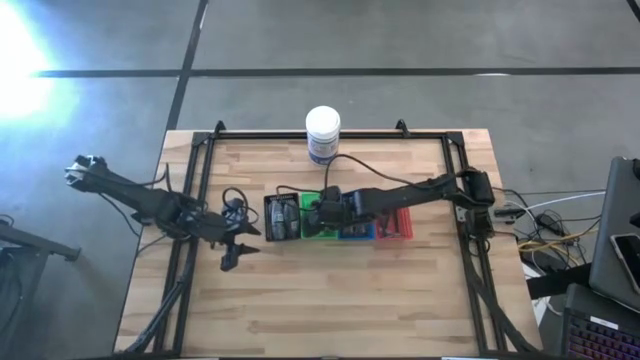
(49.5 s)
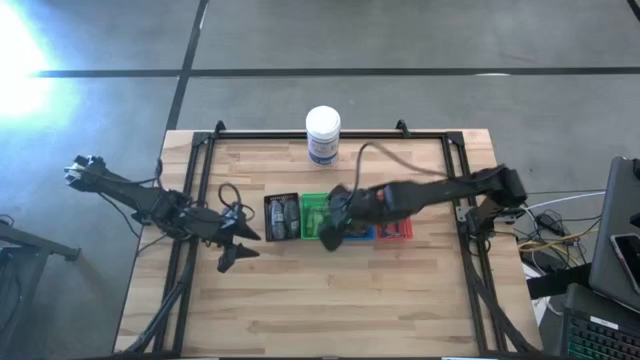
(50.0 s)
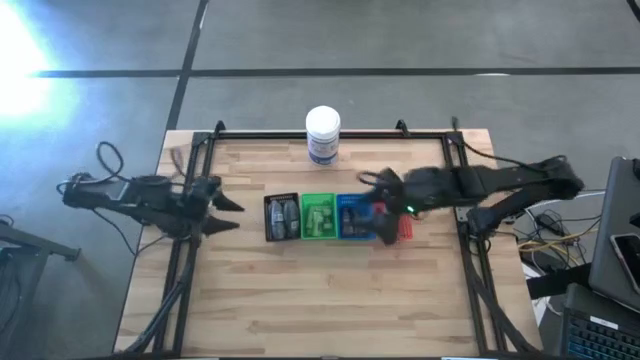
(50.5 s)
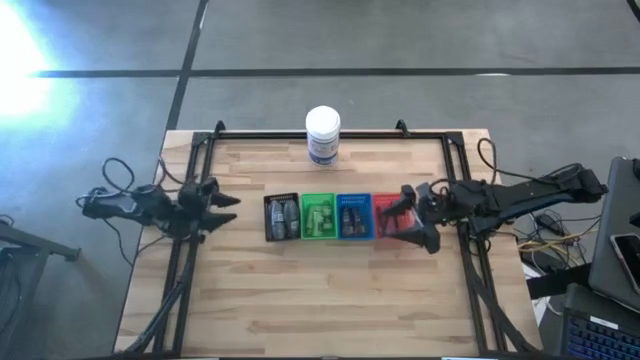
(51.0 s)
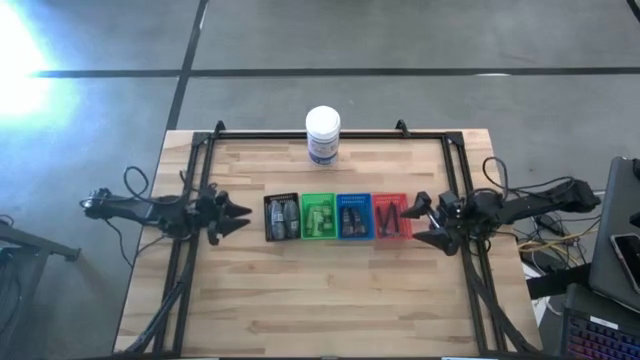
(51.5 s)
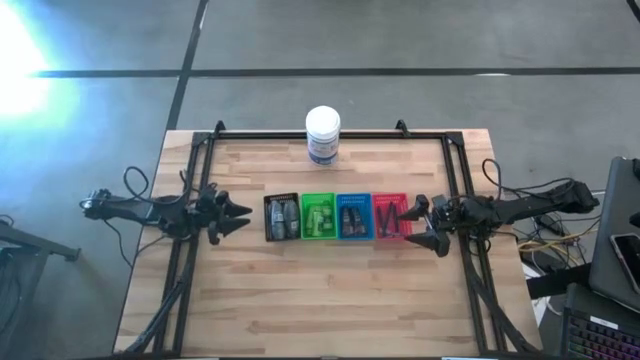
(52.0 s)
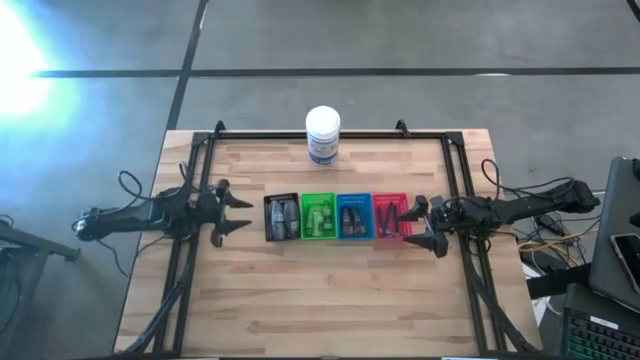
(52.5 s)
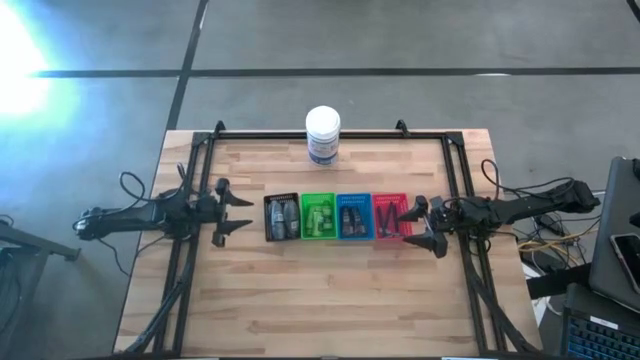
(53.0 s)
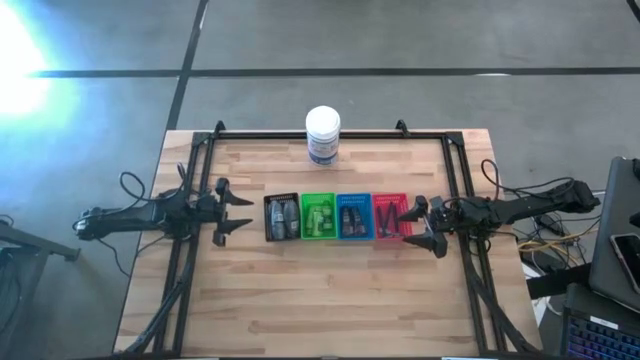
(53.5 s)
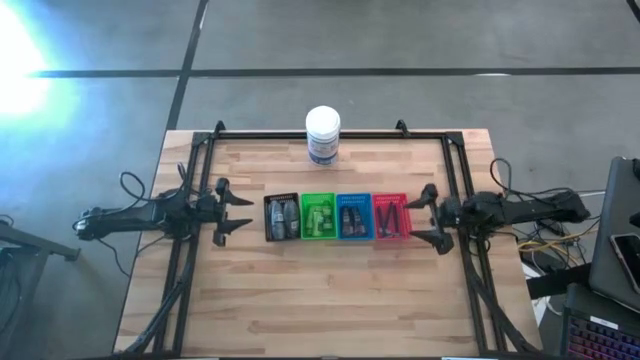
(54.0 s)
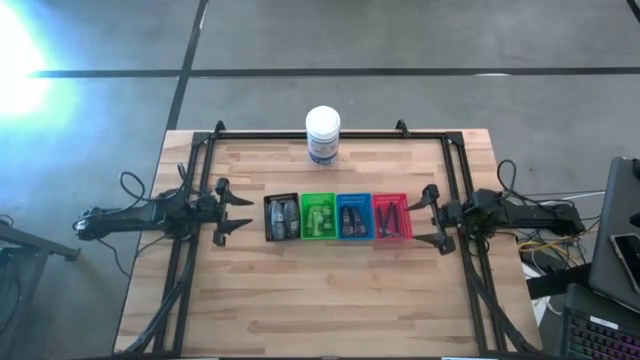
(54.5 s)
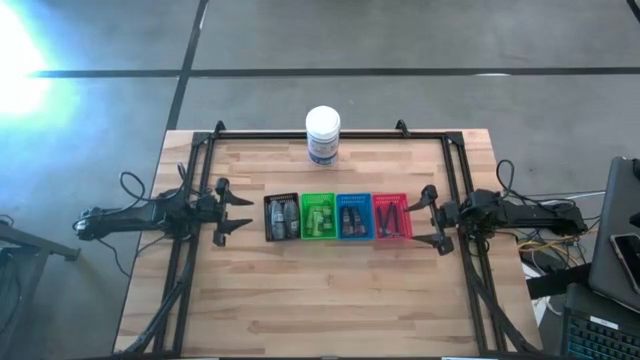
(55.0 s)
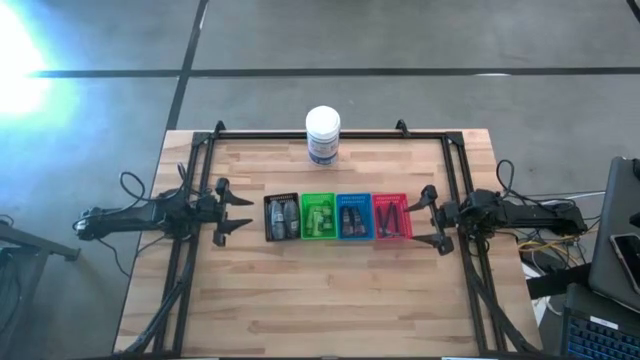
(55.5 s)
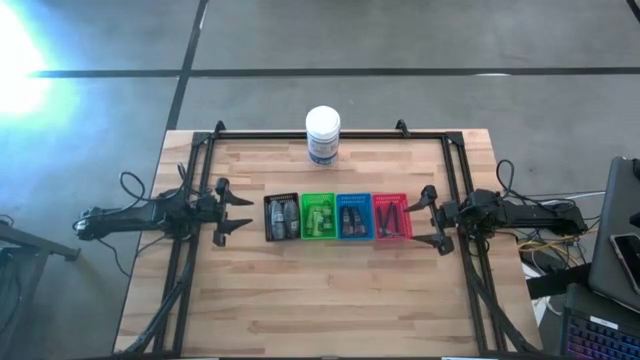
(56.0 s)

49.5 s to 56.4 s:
Task: Pick & Place Travel size toiletries
Return to Home Position

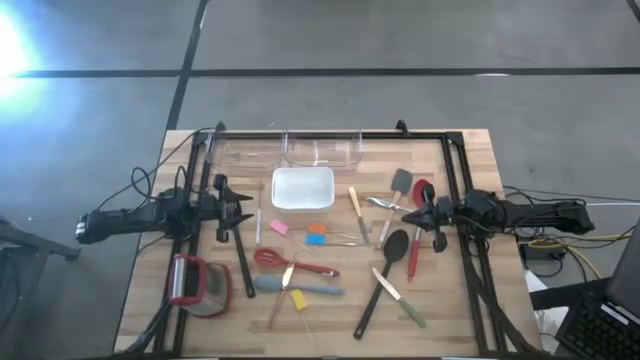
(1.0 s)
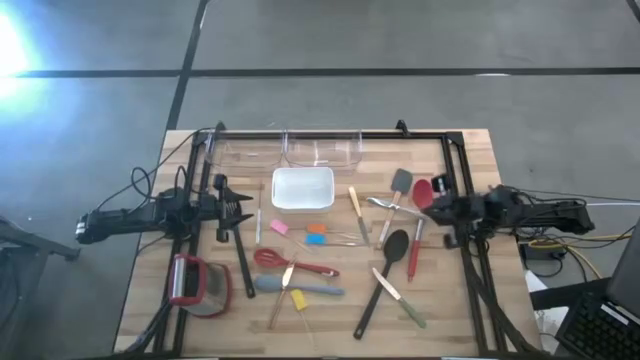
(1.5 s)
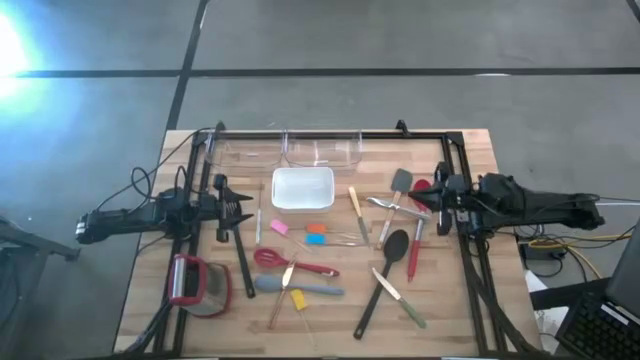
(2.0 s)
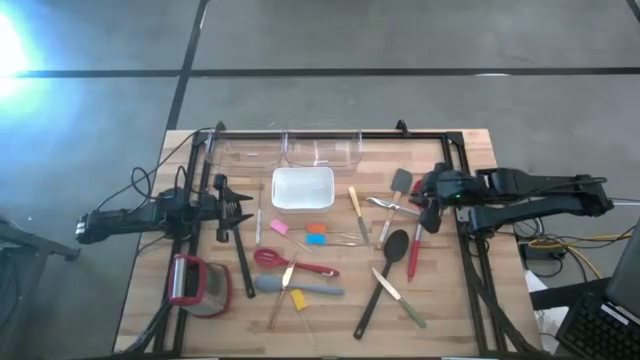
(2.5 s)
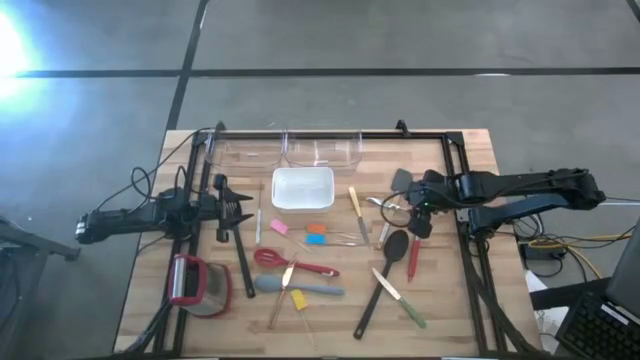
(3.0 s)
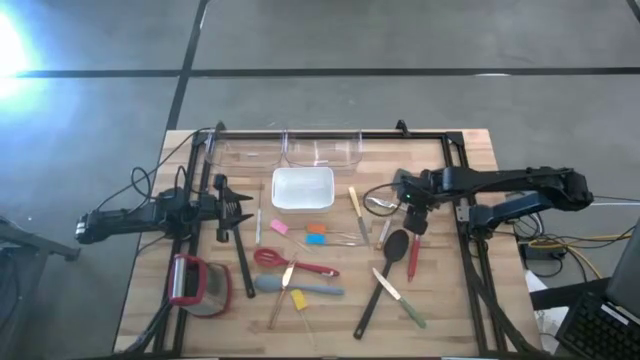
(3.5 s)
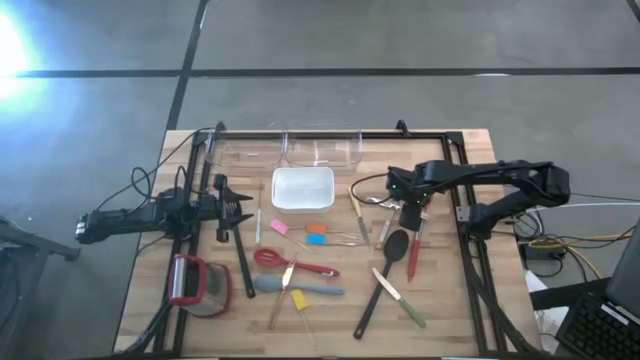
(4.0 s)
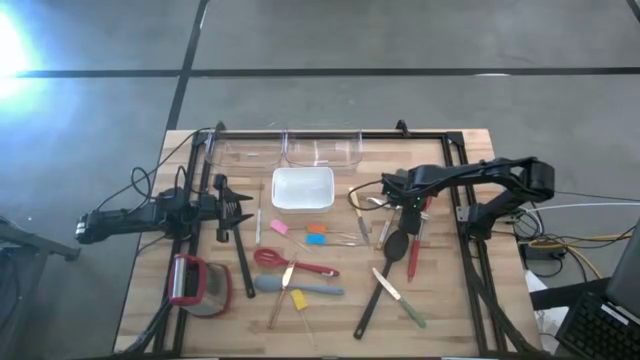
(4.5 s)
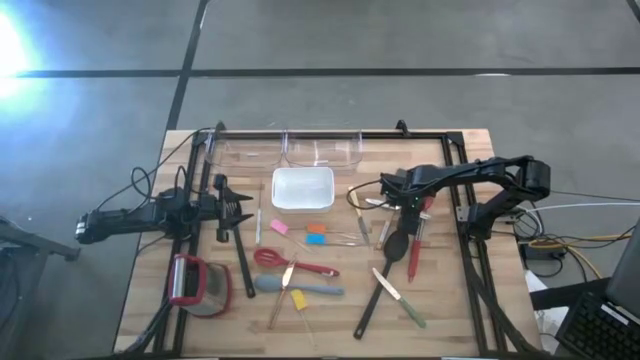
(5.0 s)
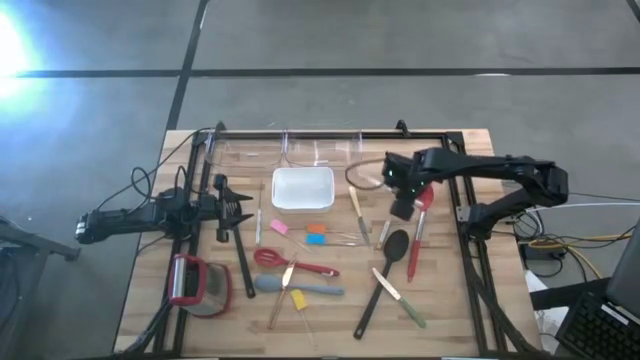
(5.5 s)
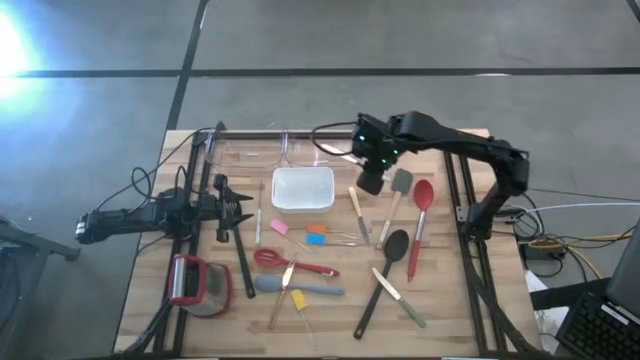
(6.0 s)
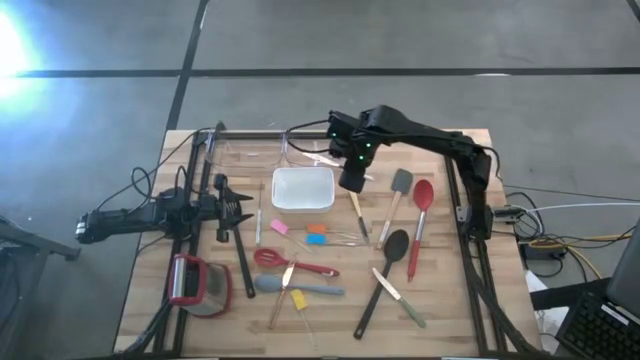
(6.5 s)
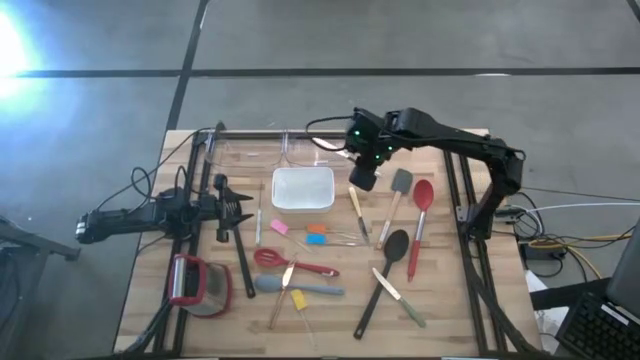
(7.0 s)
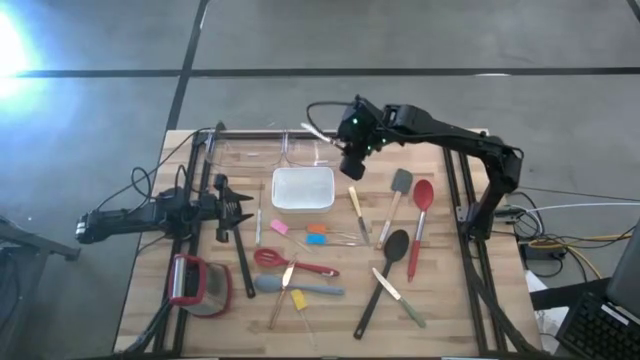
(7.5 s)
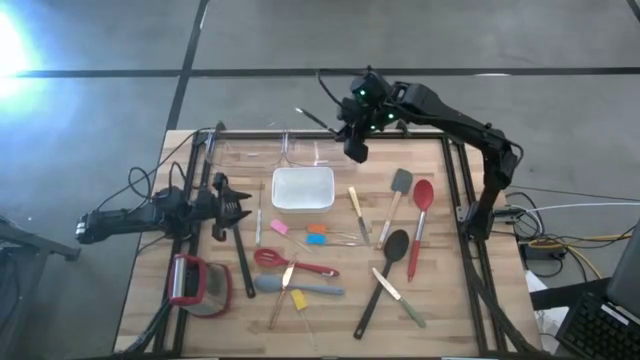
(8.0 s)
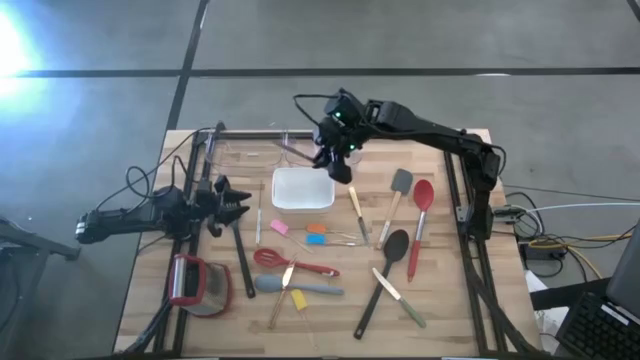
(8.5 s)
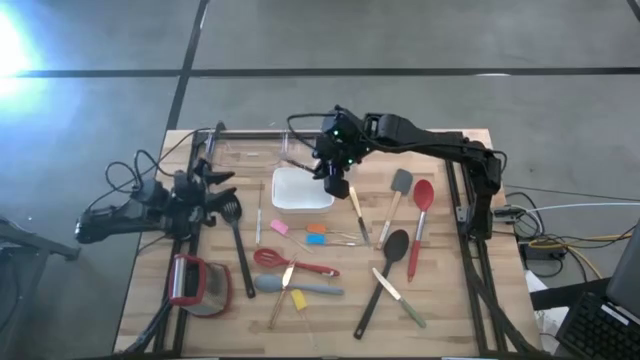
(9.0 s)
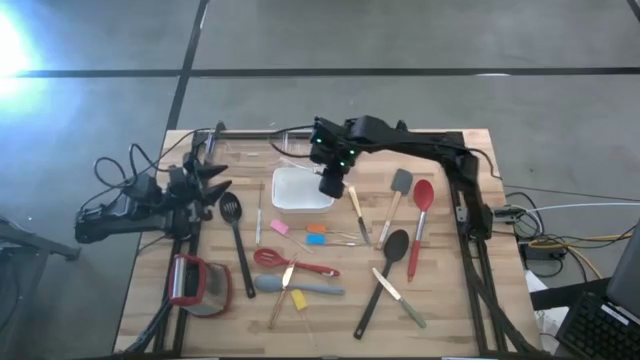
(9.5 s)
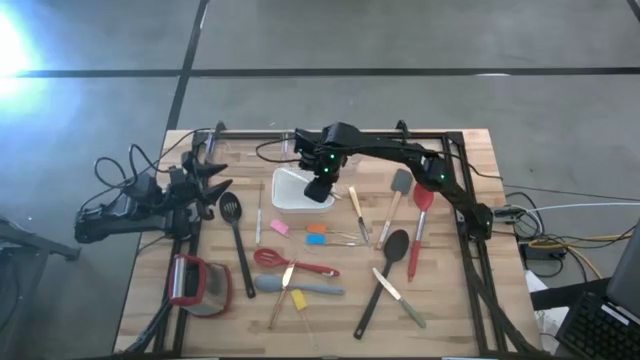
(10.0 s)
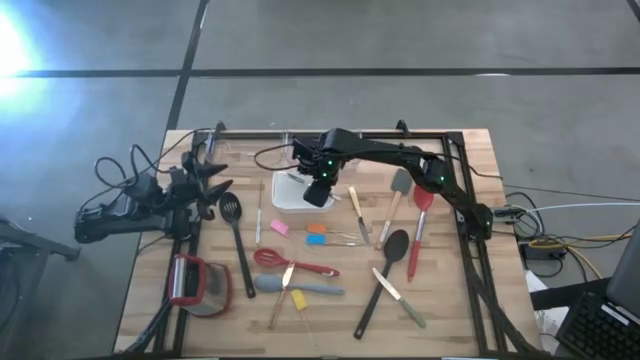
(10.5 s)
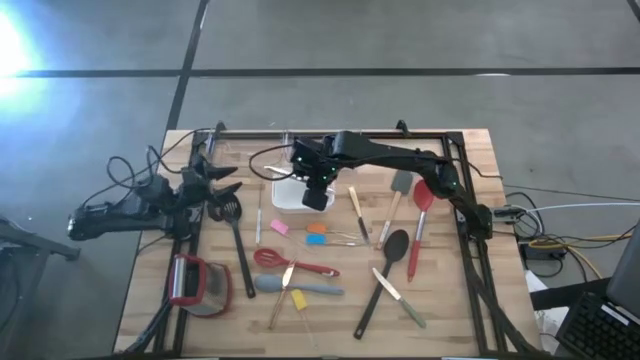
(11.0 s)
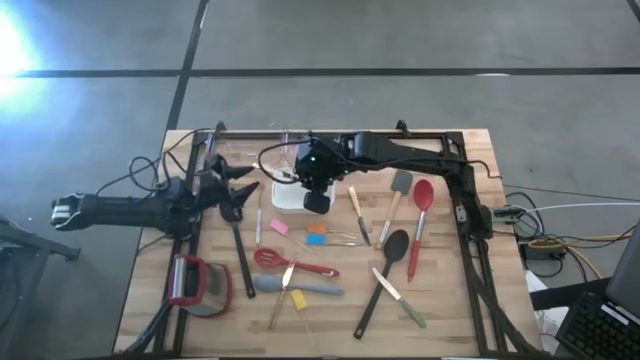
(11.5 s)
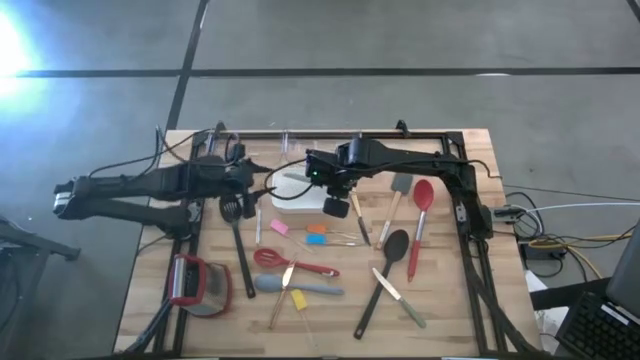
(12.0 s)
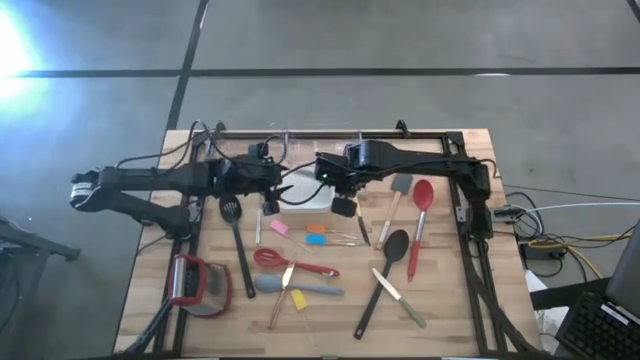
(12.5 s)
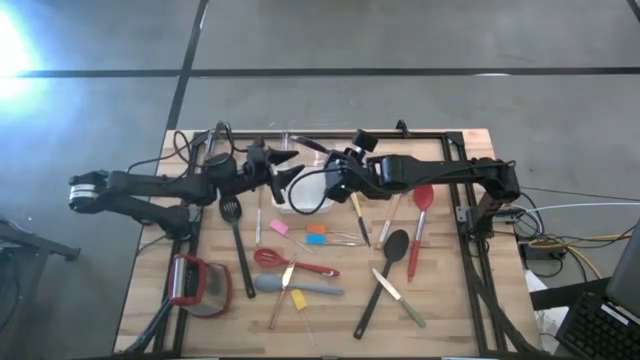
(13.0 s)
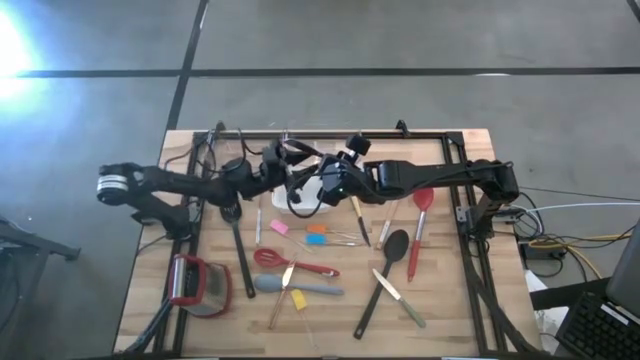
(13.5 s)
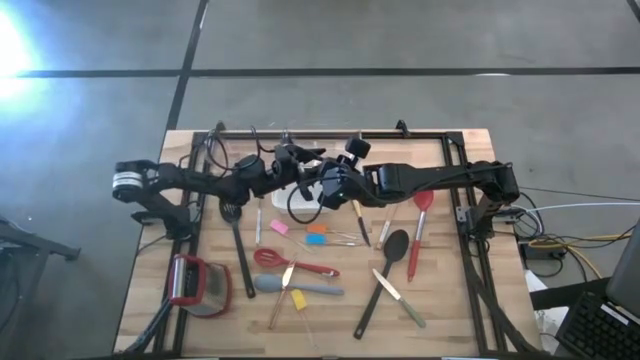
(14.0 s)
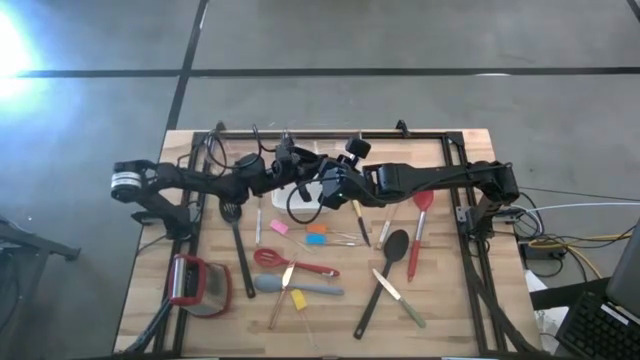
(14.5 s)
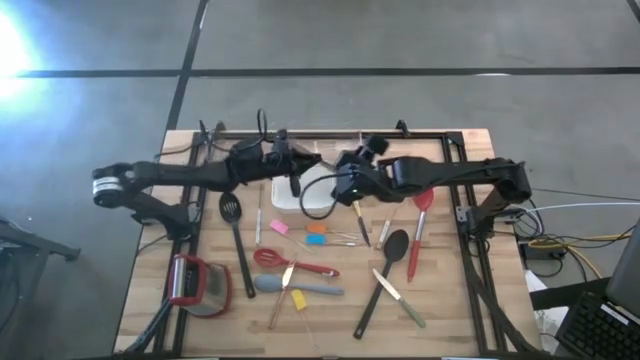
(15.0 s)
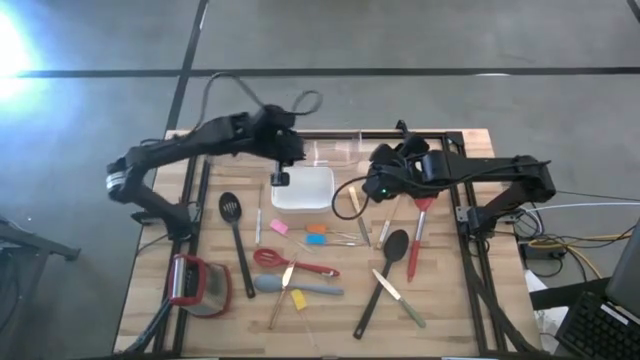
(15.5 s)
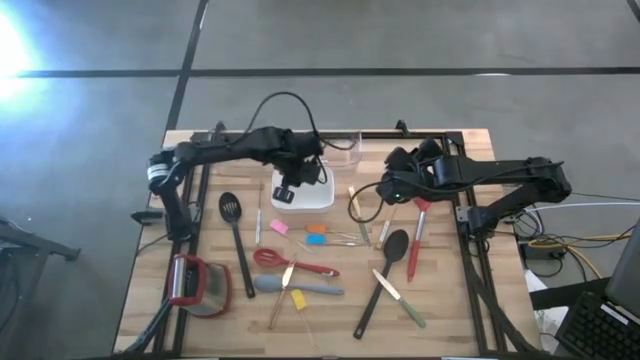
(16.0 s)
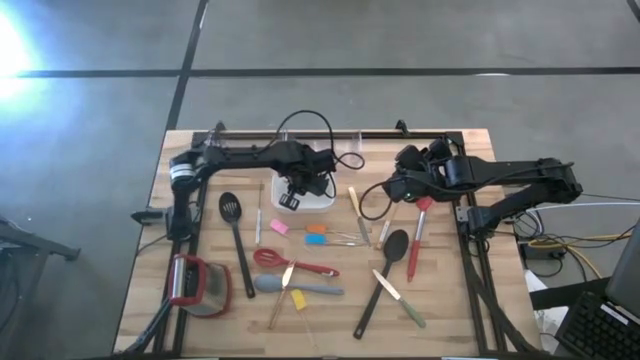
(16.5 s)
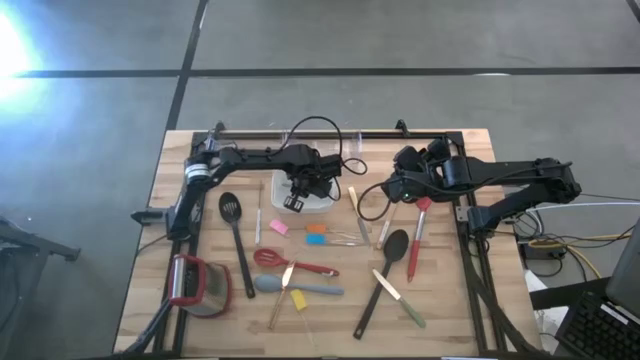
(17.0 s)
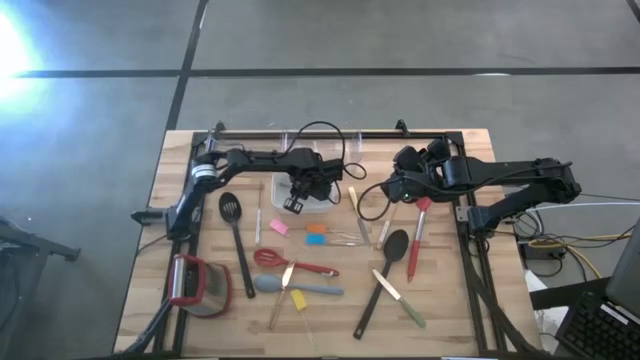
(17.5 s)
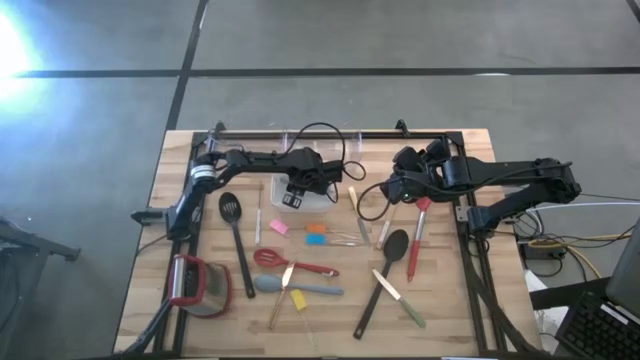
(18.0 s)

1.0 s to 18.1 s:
Task: Pick & Place Kitchen Items
Put the silver knife into the white bin
